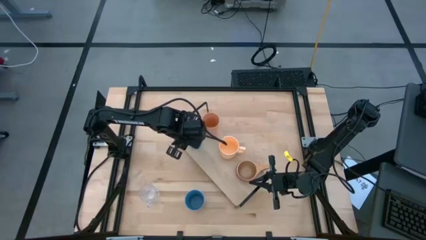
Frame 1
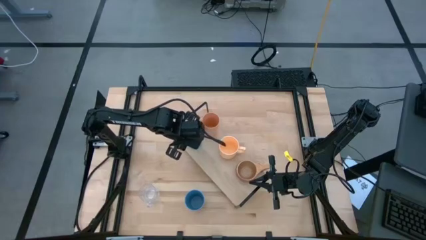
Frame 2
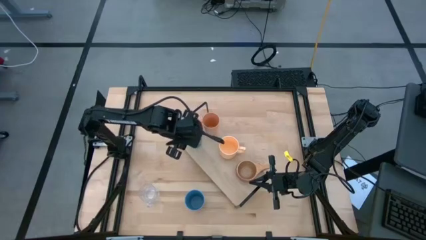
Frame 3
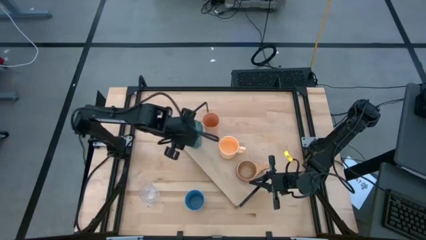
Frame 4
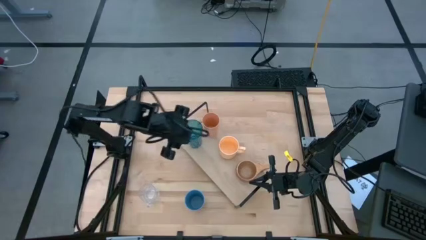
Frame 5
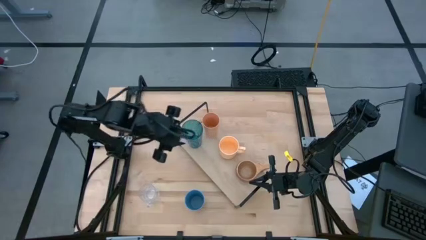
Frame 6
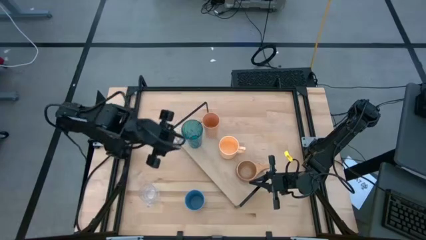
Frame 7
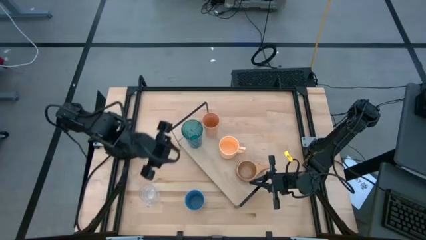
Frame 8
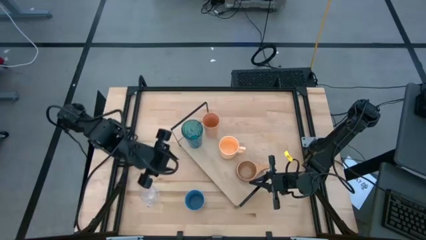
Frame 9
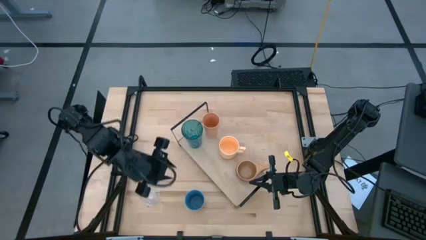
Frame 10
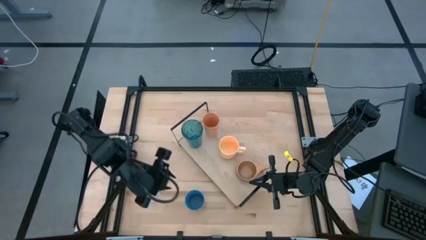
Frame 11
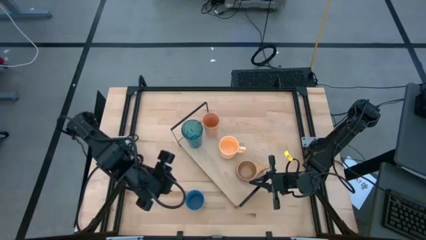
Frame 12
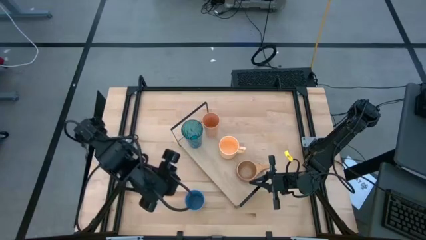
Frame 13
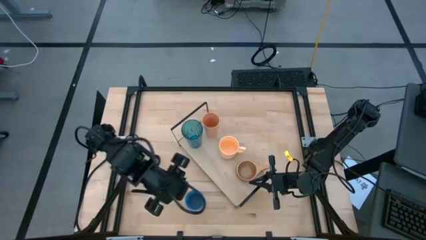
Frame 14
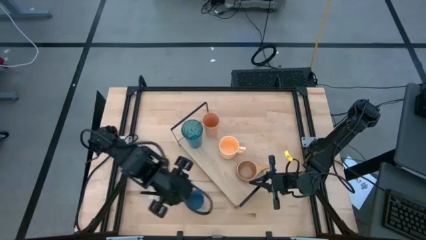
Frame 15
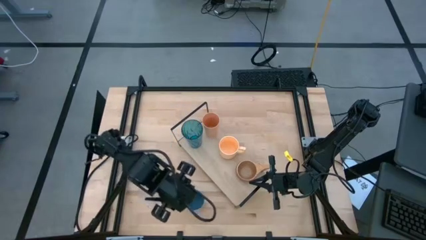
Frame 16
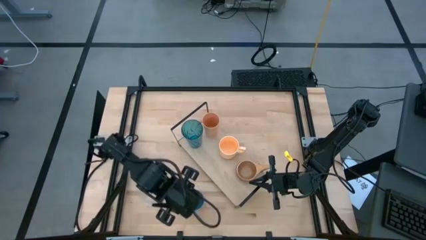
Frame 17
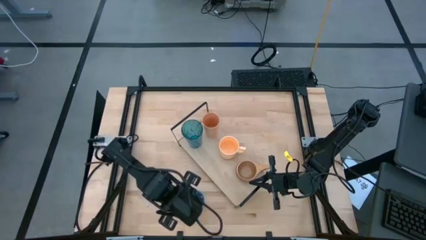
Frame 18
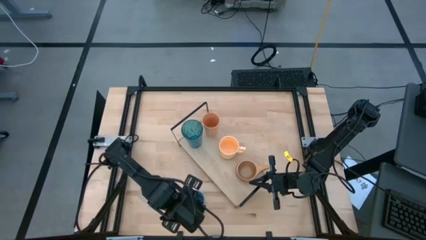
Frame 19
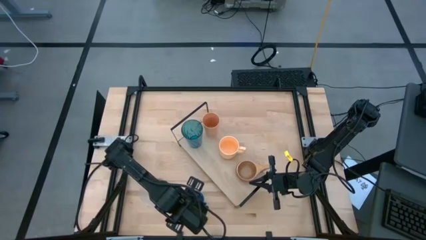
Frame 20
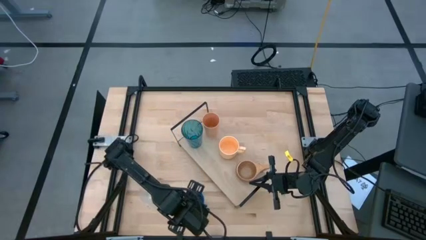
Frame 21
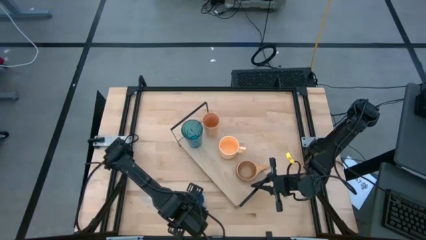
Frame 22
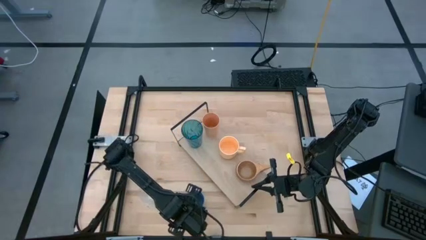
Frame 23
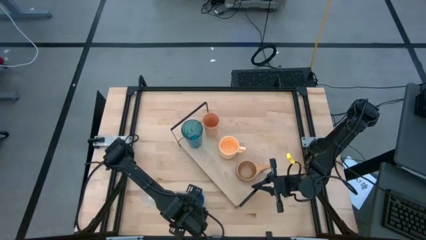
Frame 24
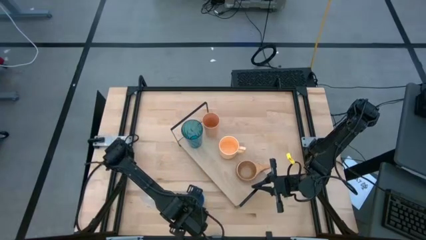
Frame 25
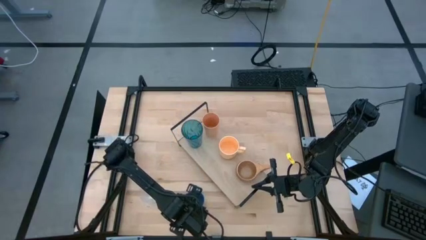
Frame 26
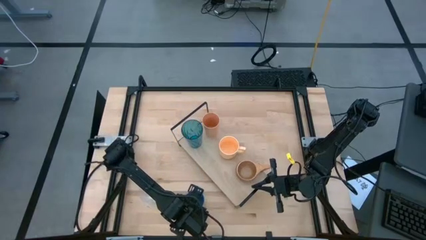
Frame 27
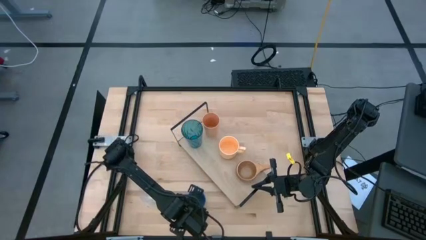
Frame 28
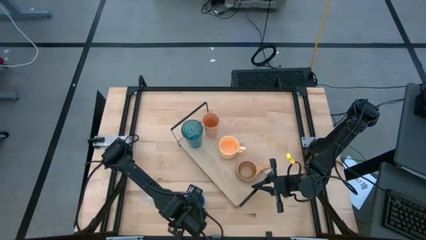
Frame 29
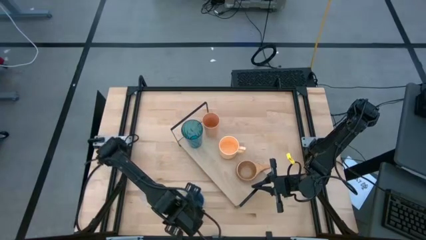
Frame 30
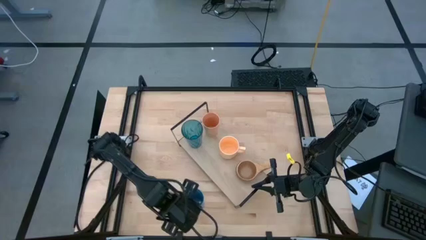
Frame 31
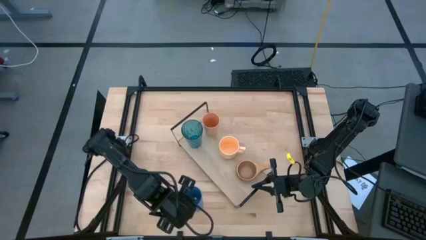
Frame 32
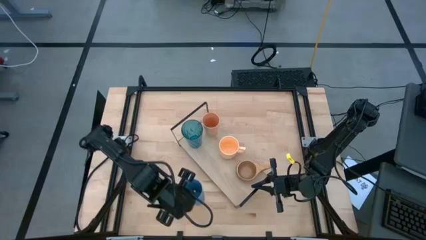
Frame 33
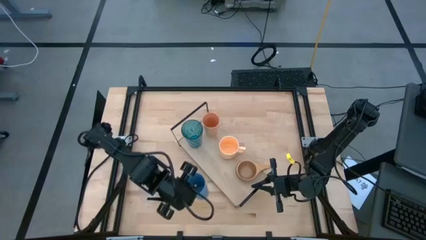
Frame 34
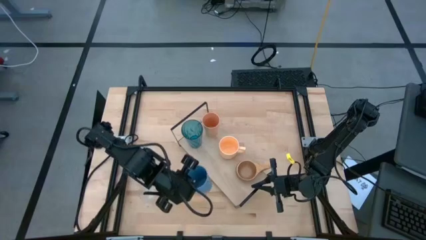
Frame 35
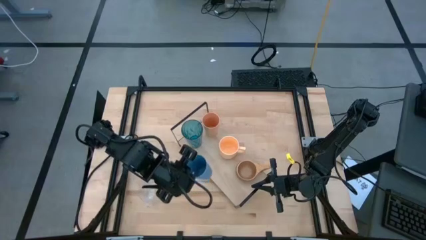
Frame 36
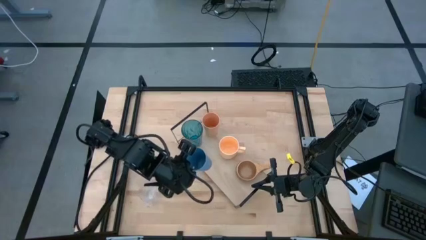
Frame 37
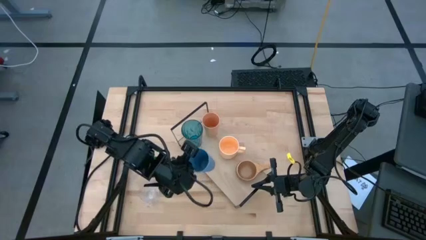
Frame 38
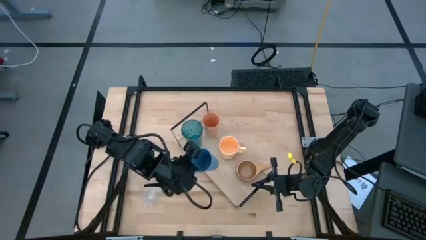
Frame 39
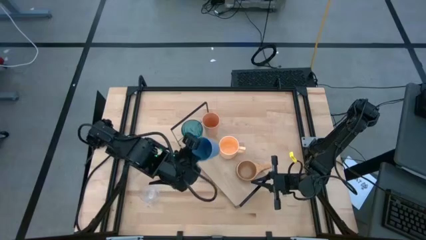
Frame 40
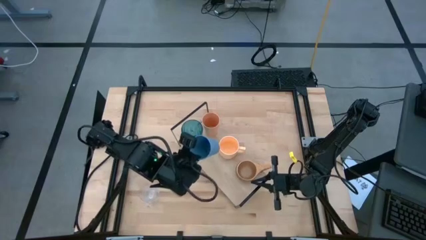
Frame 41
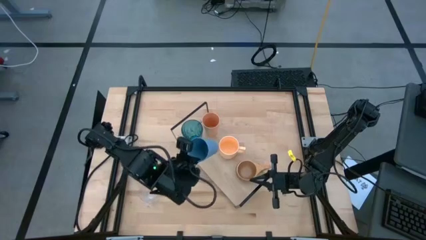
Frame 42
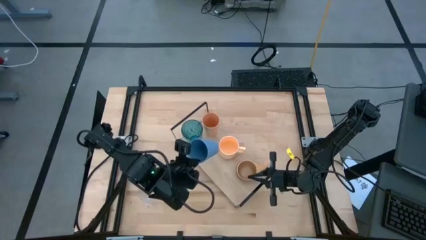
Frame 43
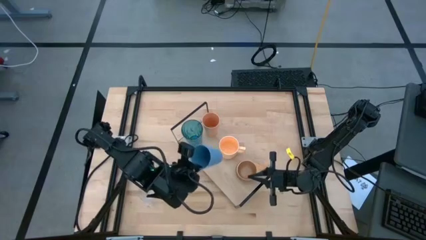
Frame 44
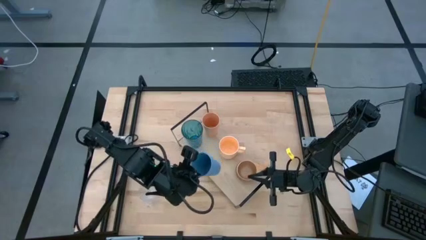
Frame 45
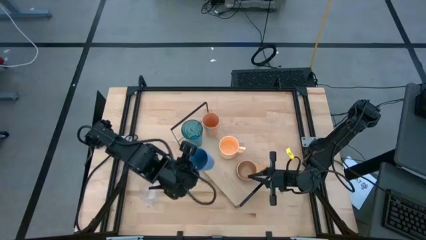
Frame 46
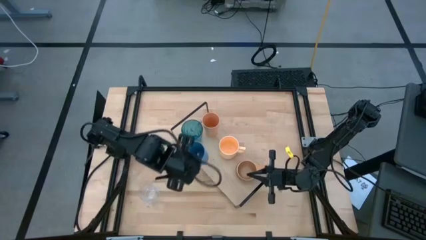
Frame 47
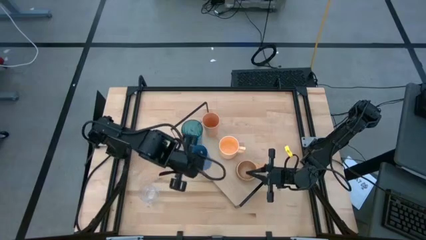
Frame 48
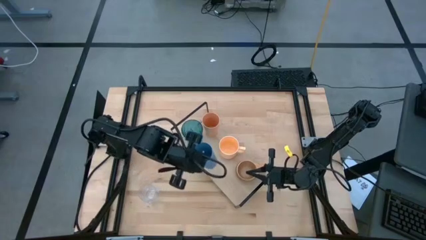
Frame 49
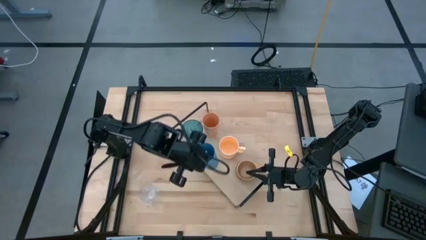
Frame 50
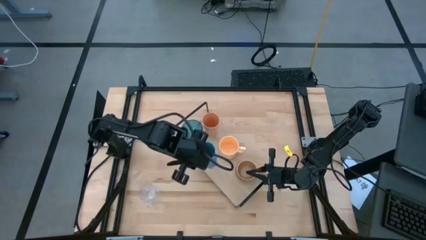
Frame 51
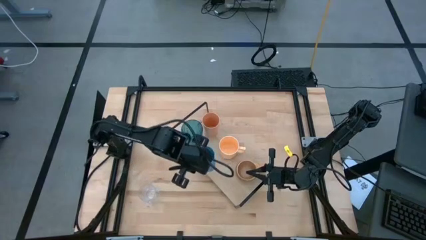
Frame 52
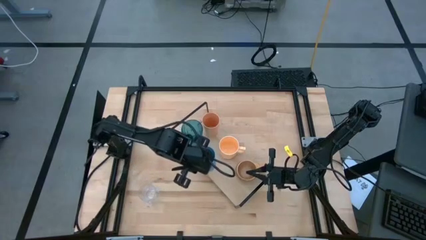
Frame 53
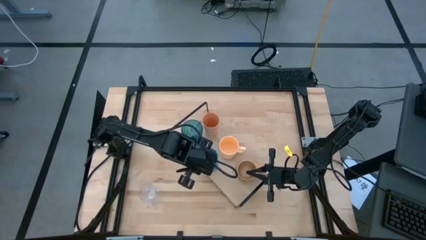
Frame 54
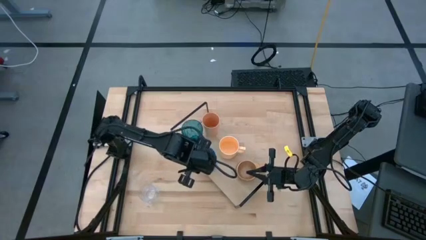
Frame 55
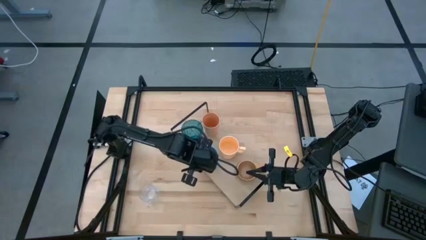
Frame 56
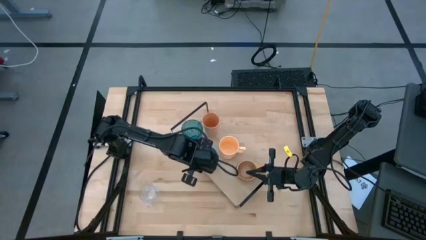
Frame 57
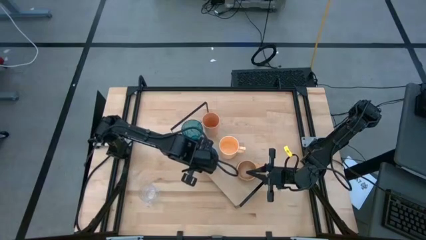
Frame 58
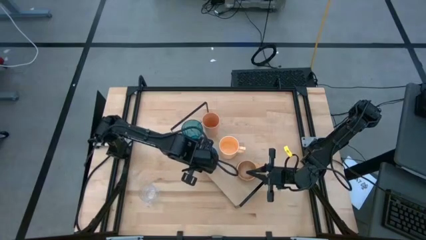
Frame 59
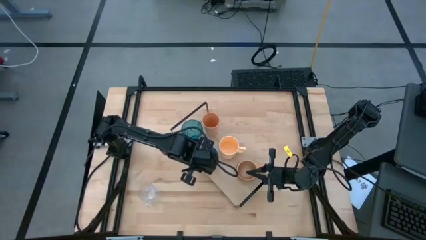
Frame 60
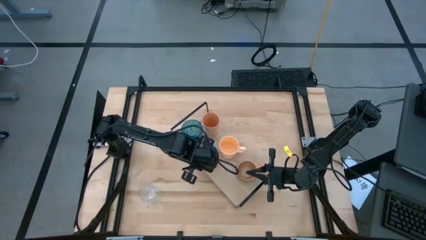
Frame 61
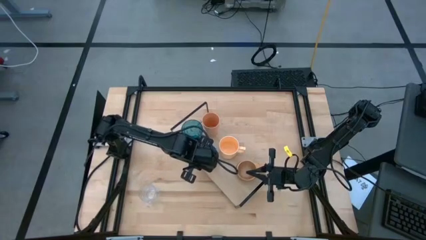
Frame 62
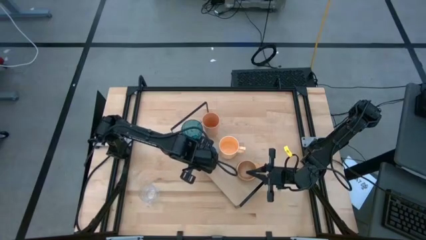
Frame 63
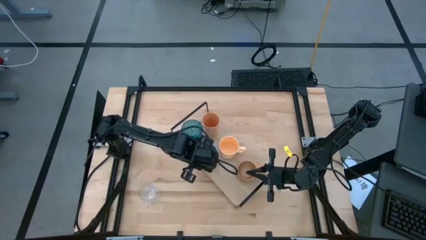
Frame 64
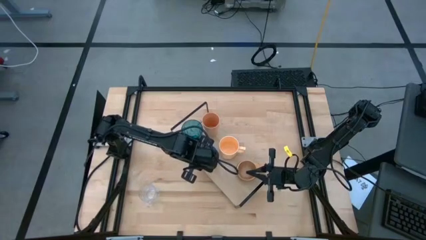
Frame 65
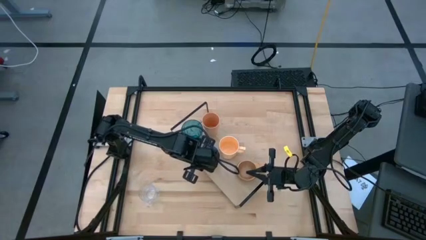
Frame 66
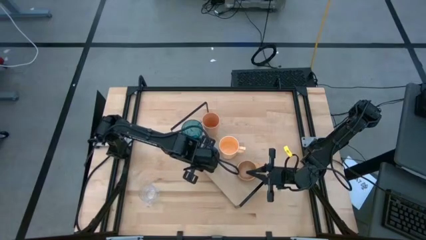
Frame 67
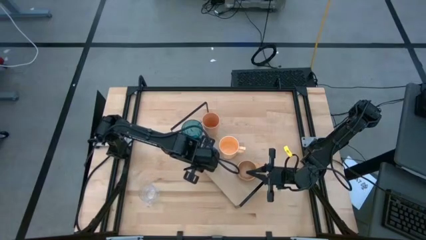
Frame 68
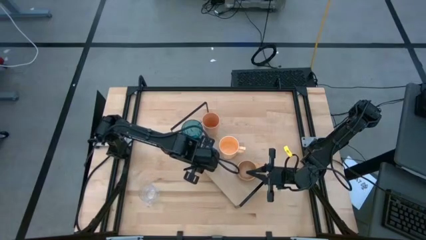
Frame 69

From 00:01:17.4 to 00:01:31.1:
Task: Stack small to large cups/mugs on shelf
Put the blue cup on the shelf
